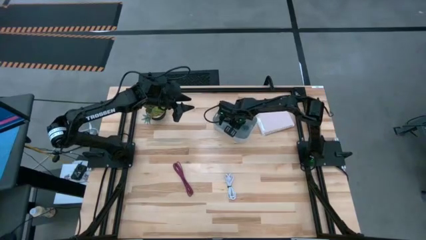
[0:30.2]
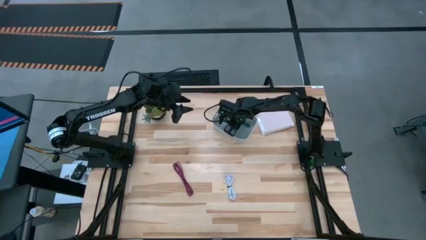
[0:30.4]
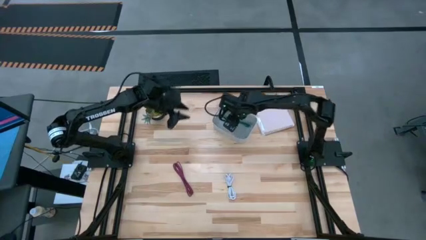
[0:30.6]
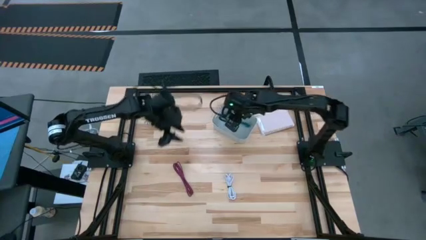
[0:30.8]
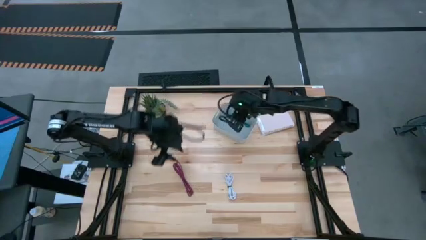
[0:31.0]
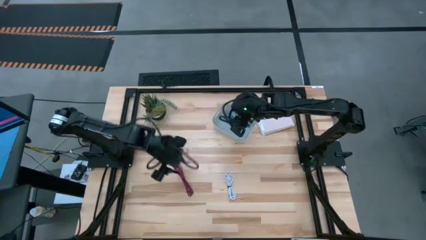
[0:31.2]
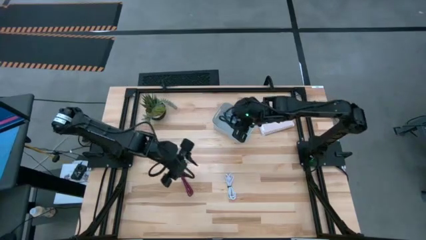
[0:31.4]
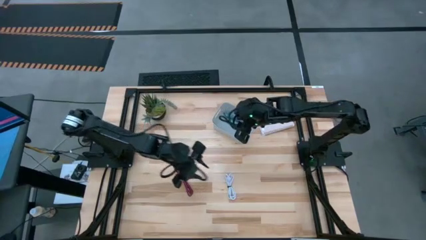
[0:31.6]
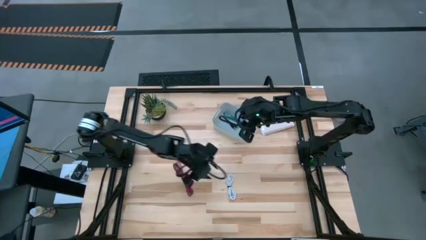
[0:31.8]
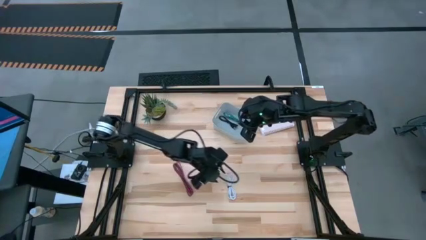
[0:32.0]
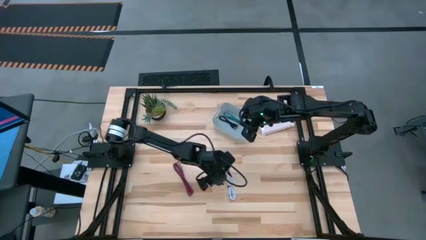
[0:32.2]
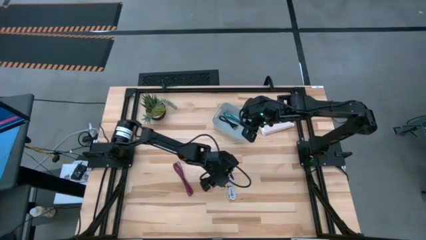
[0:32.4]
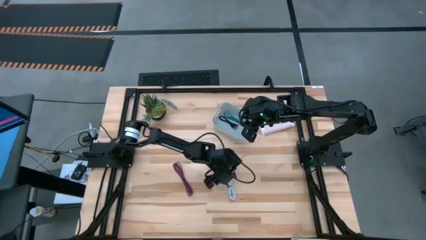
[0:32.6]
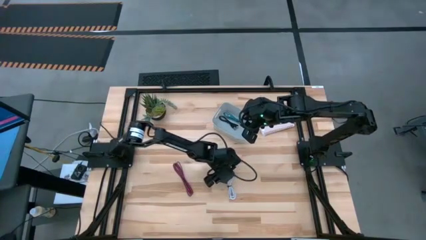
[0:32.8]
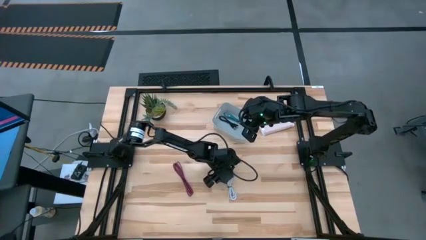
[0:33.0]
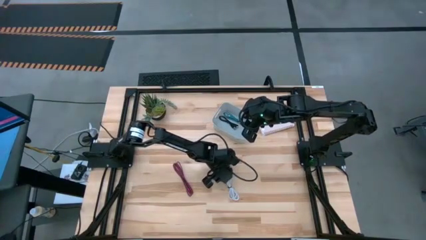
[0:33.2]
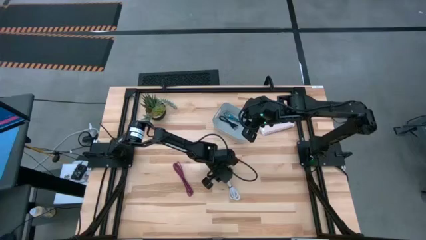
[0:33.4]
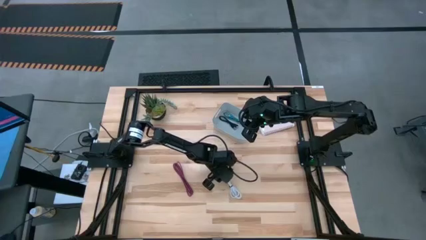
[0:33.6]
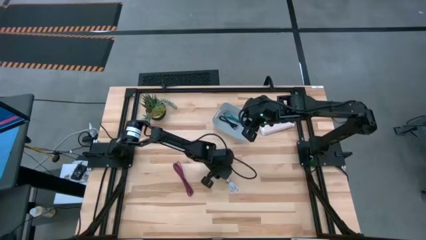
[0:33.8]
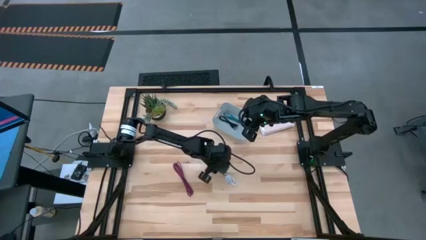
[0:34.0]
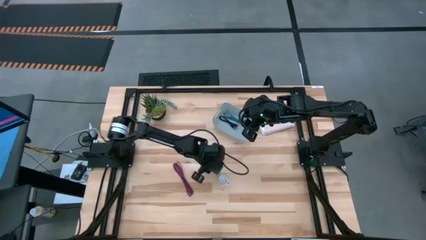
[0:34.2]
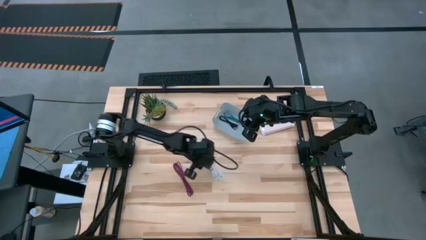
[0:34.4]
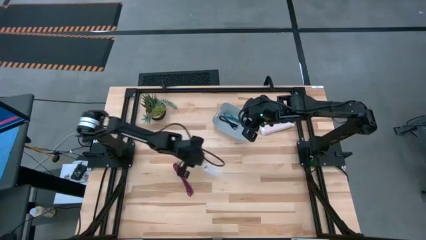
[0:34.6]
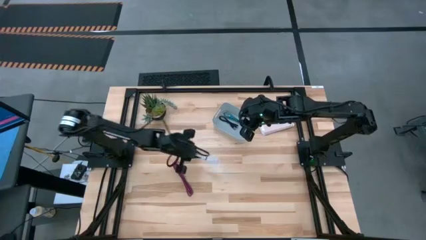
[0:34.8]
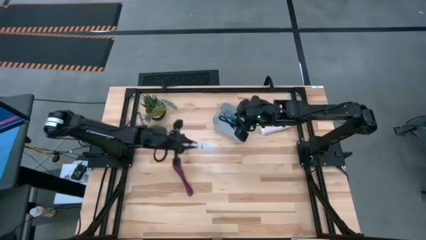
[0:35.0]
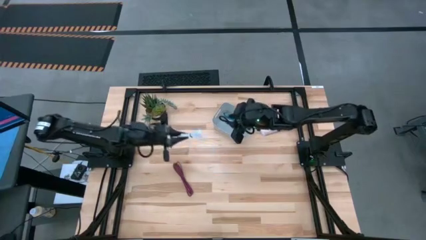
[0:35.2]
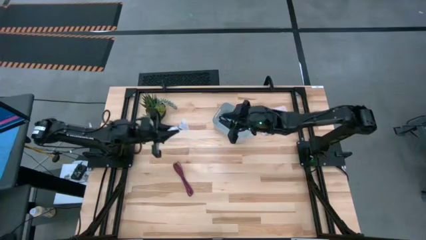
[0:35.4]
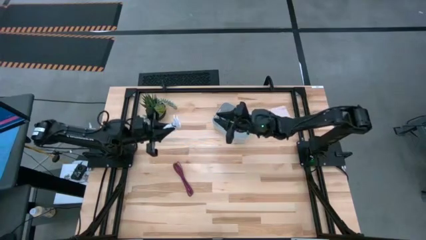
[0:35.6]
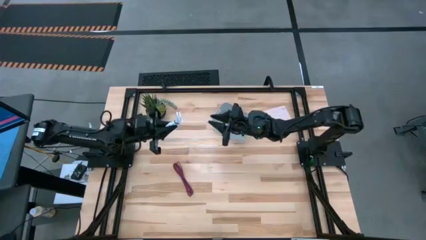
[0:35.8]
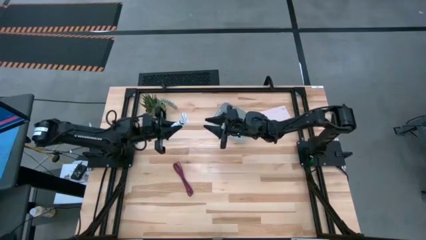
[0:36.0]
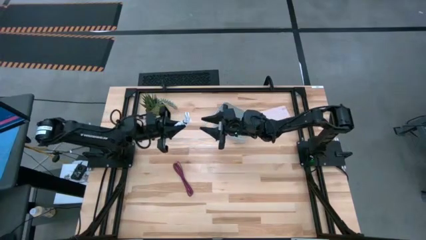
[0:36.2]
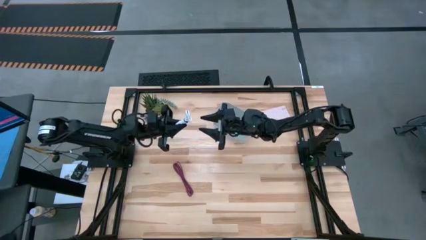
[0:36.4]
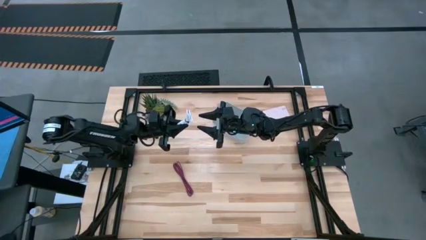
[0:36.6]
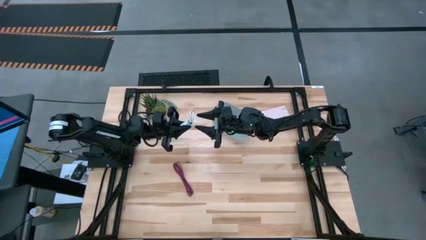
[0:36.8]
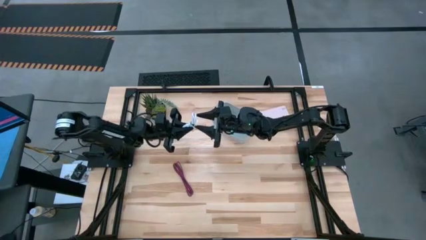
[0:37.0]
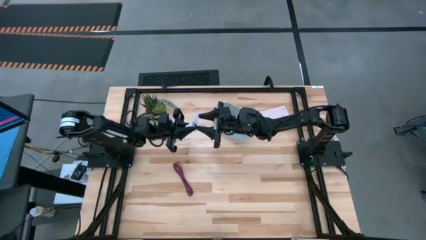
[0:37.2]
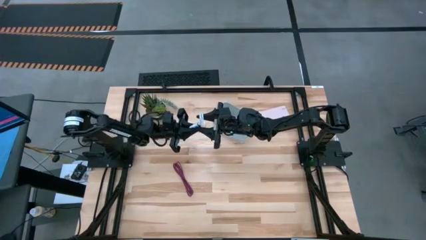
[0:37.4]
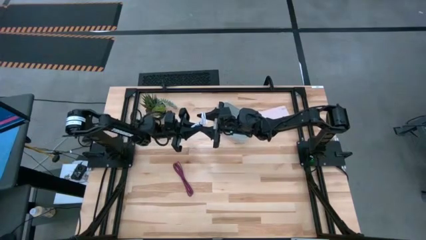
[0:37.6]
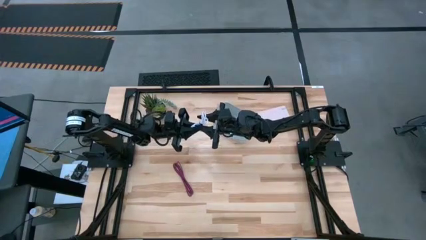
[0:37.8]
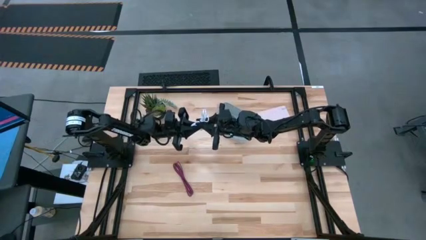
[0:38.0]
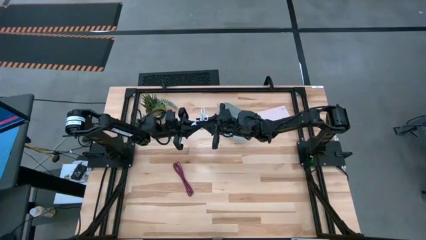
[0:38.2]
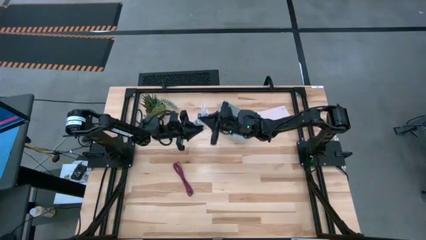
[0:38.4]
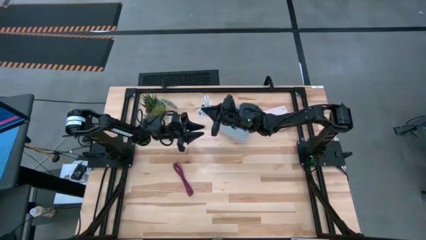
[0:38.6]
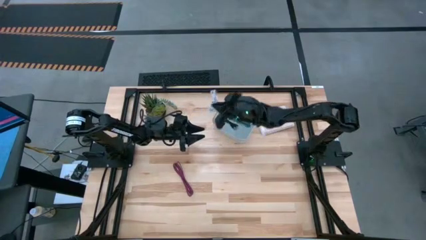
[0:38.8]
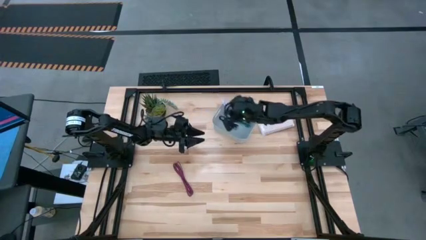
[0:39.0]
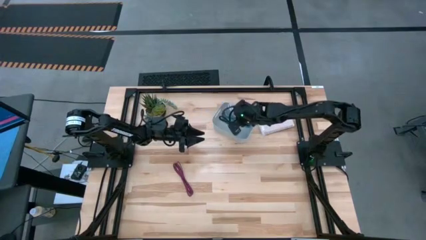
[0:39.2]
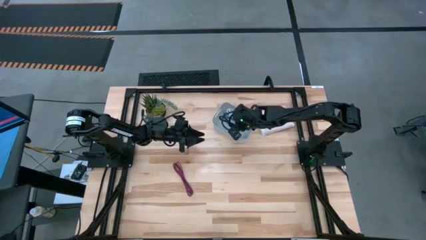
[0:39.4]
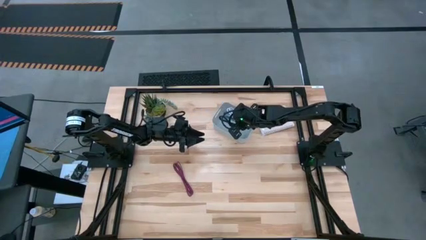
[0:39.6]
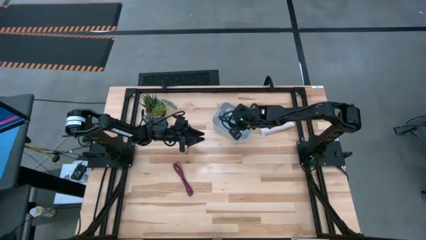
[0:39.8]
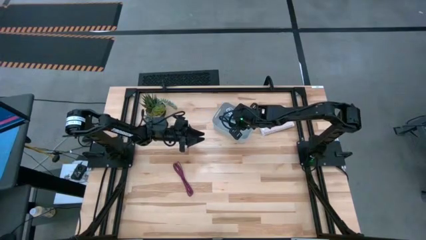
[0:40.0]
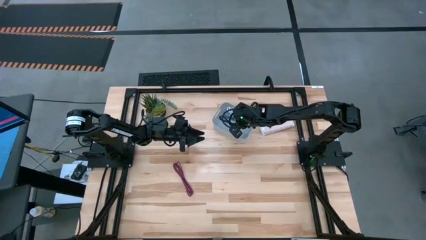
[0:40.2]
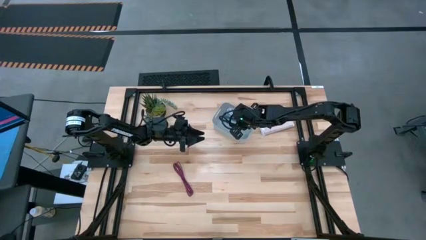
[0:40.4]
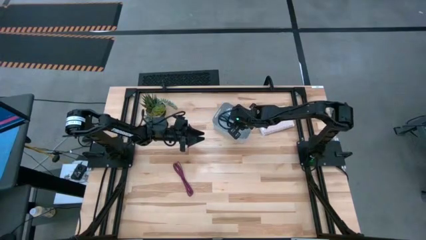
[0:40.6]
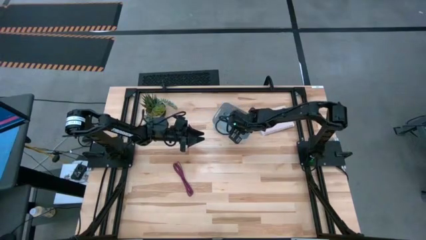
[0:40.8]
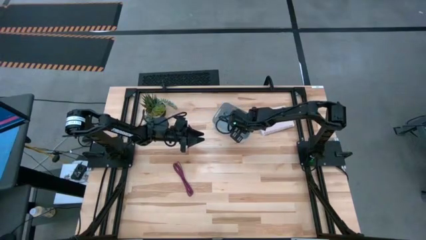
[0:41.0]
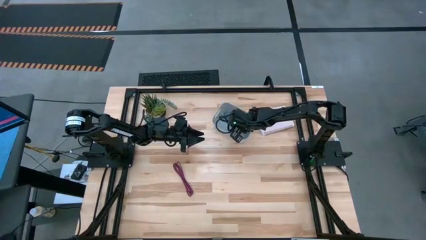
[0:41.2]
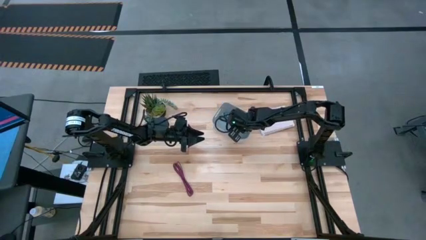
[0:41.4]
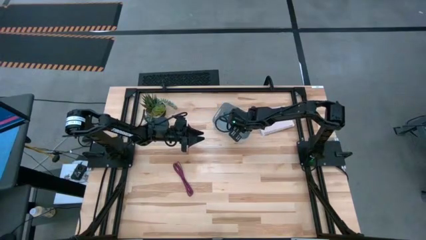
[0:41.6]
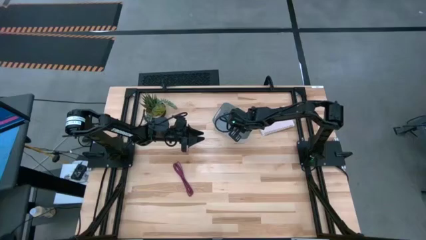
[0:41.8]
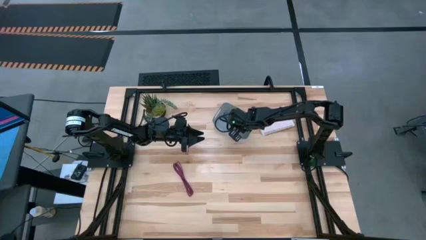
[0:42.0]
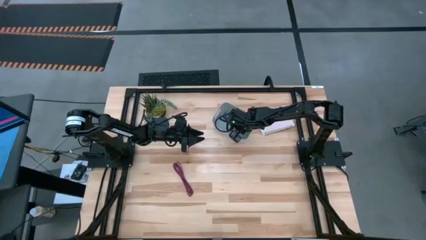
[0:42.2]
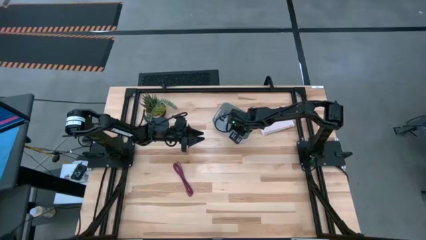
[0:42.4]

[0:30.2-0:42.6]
Task: Pick and place USB-C Cables
Put the white USB cable into the grey bin
